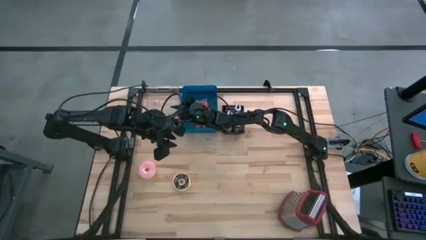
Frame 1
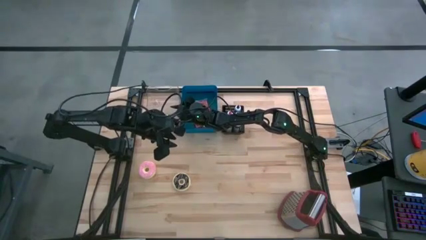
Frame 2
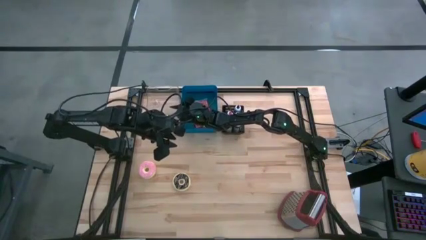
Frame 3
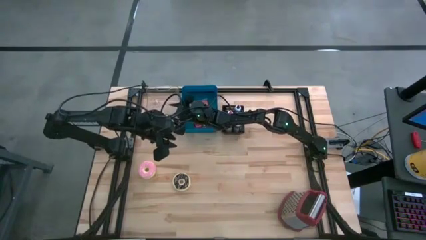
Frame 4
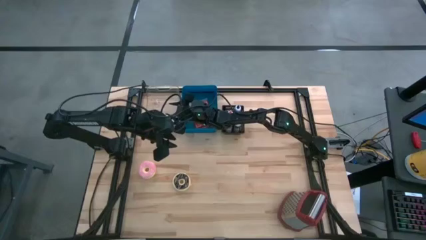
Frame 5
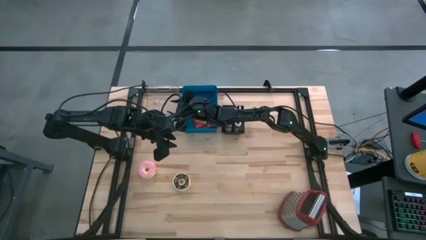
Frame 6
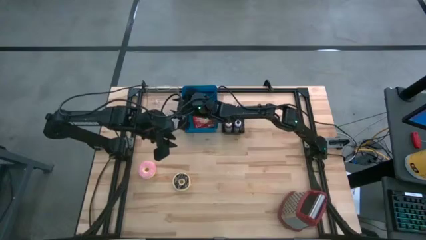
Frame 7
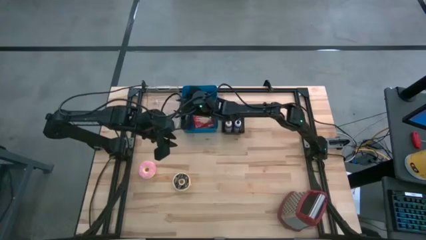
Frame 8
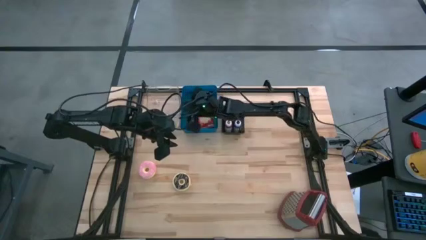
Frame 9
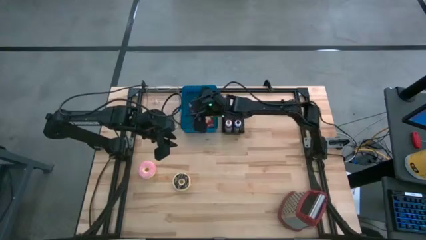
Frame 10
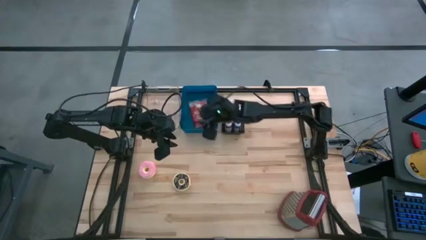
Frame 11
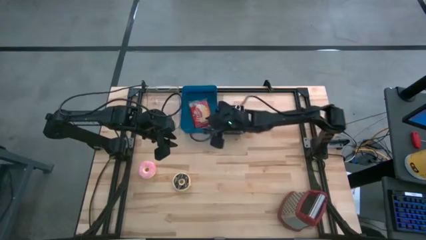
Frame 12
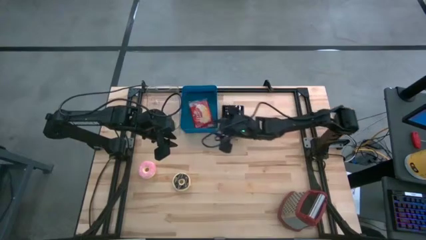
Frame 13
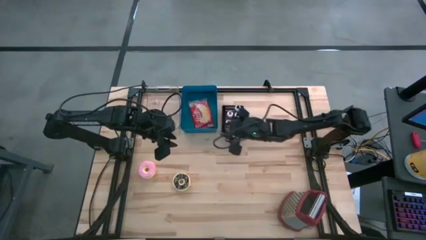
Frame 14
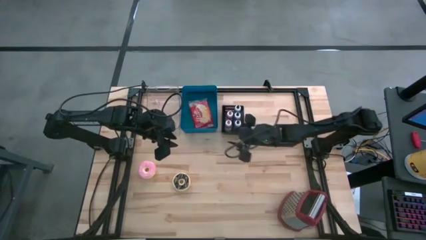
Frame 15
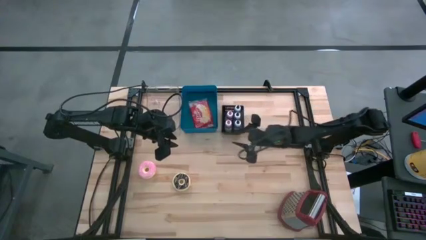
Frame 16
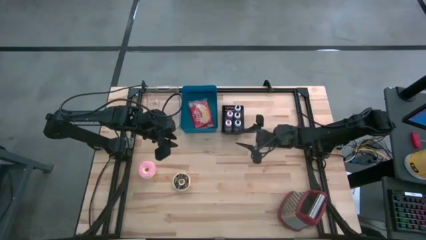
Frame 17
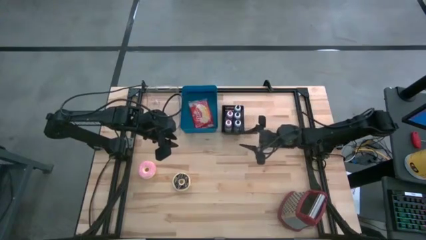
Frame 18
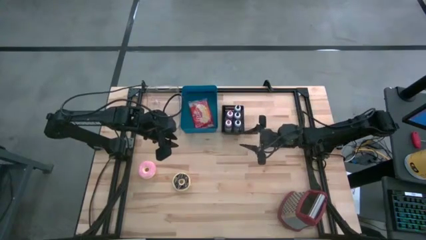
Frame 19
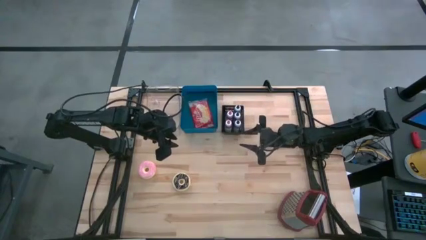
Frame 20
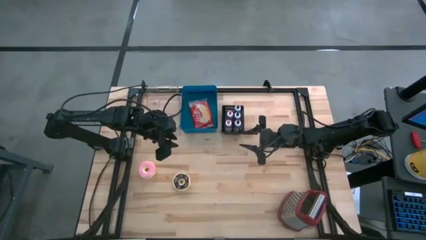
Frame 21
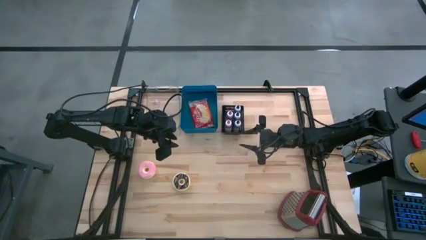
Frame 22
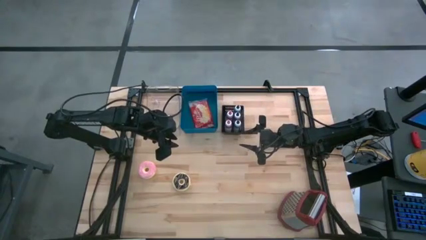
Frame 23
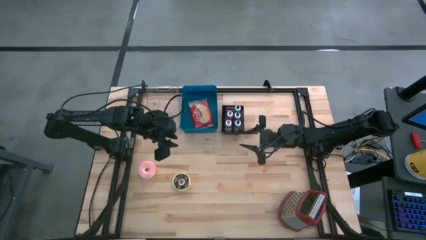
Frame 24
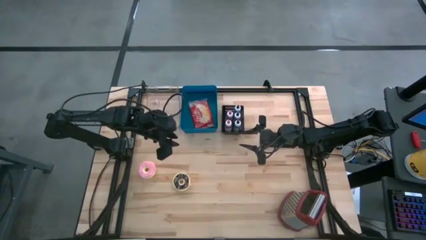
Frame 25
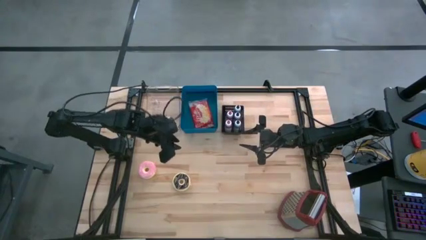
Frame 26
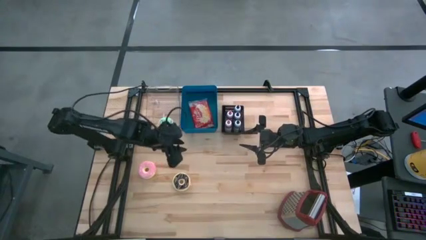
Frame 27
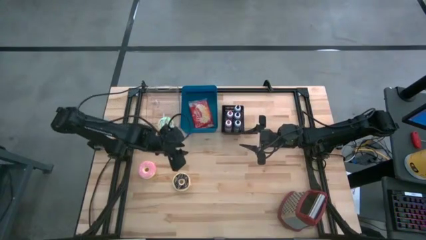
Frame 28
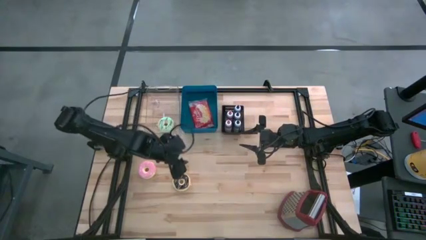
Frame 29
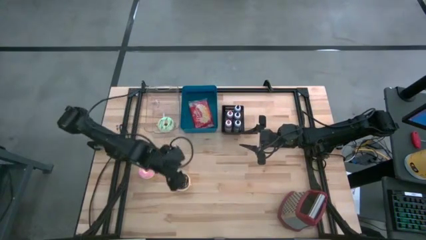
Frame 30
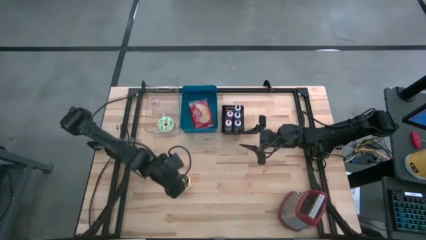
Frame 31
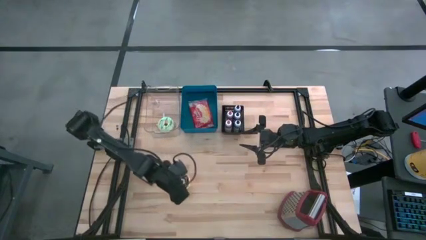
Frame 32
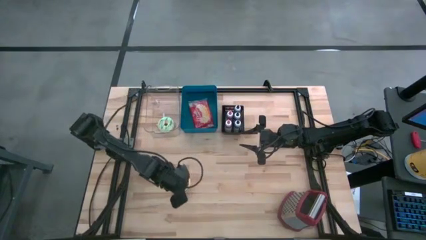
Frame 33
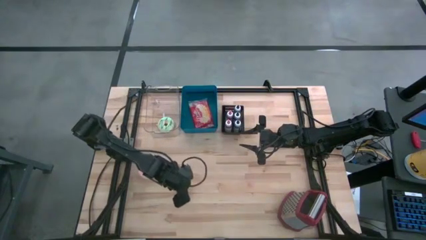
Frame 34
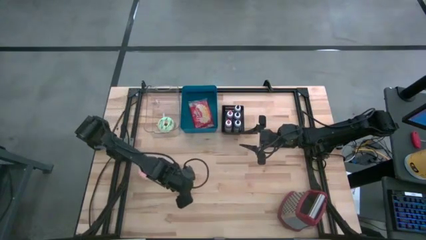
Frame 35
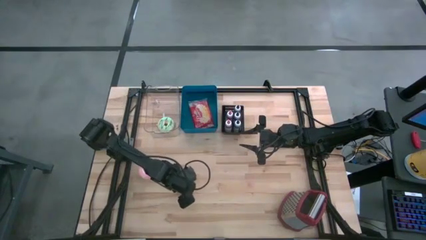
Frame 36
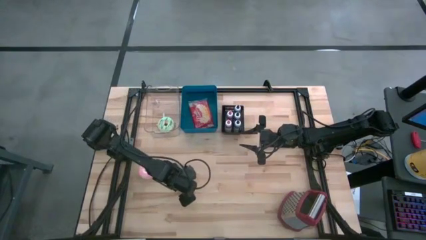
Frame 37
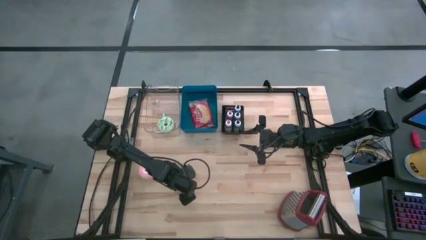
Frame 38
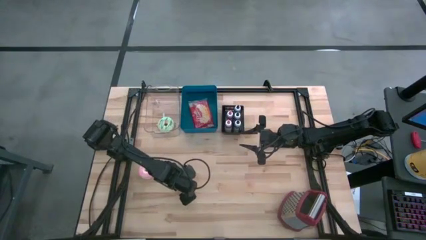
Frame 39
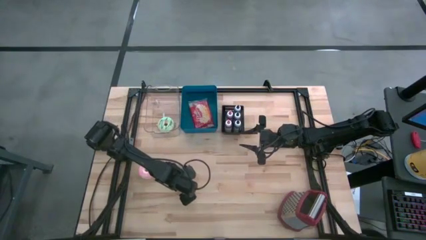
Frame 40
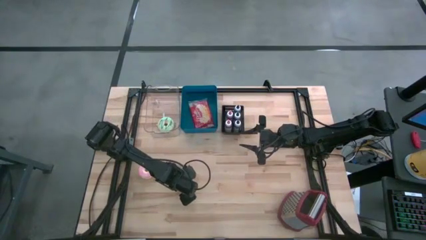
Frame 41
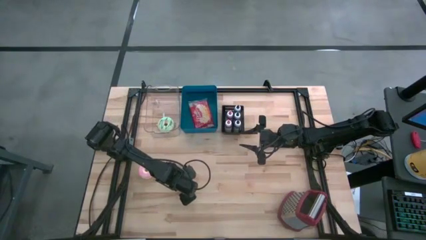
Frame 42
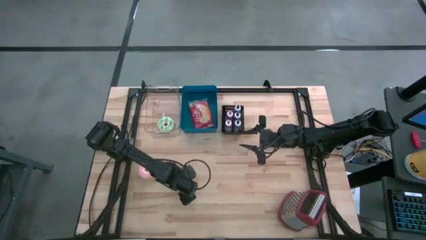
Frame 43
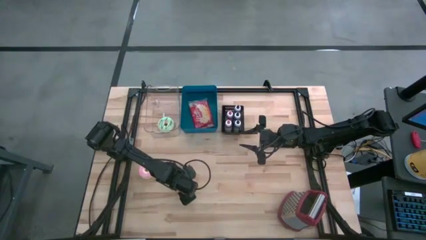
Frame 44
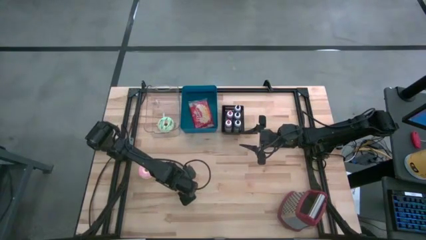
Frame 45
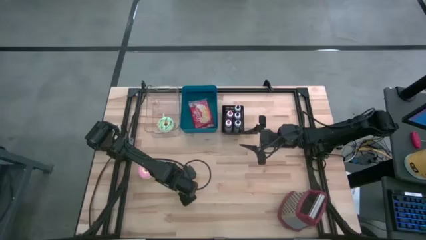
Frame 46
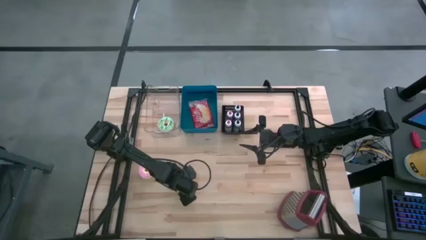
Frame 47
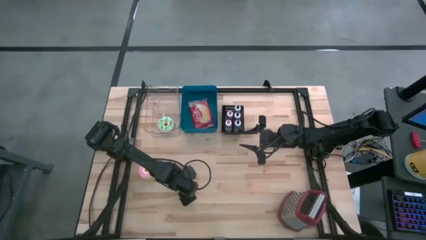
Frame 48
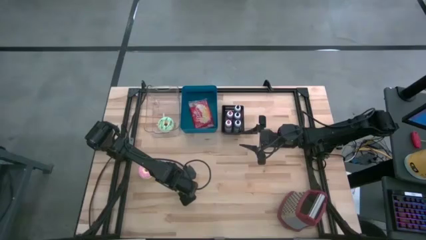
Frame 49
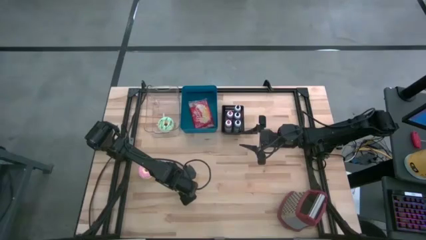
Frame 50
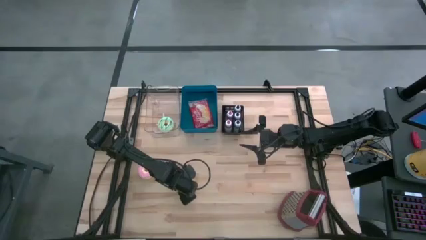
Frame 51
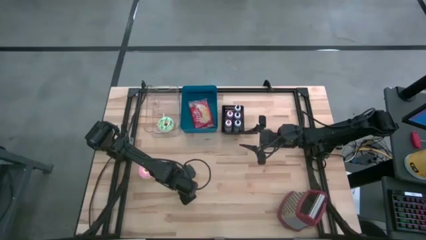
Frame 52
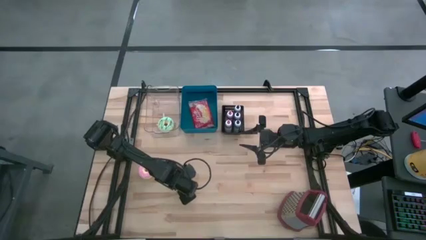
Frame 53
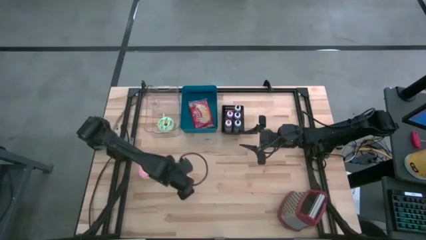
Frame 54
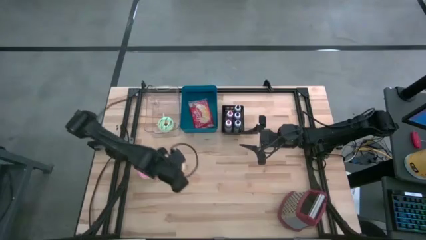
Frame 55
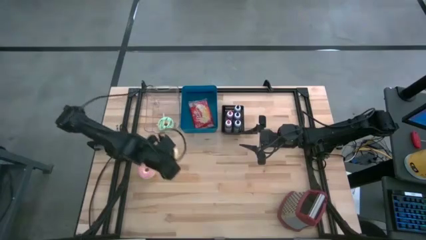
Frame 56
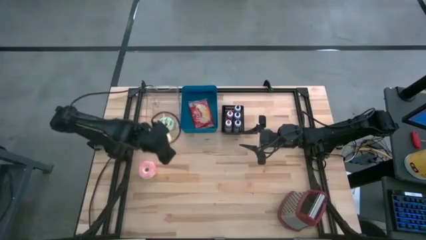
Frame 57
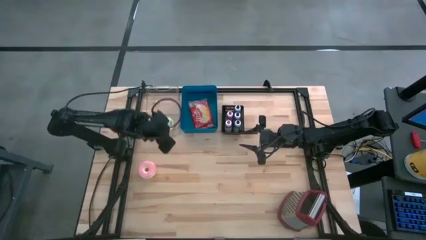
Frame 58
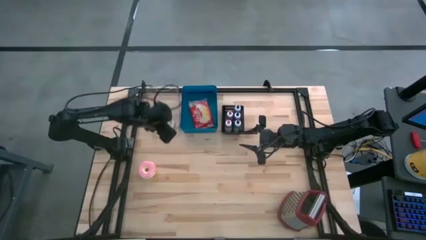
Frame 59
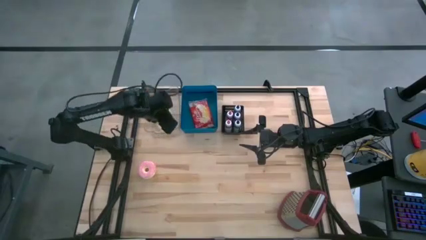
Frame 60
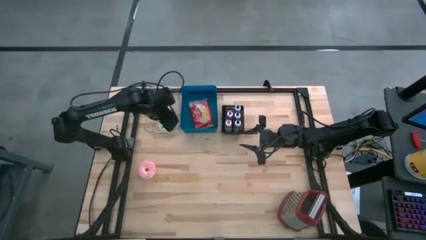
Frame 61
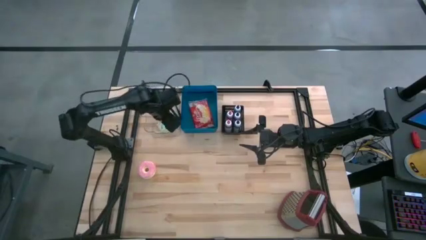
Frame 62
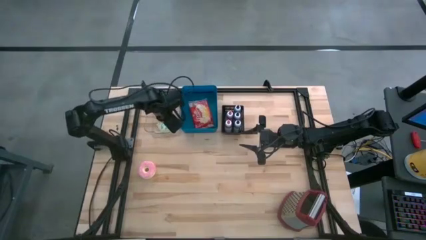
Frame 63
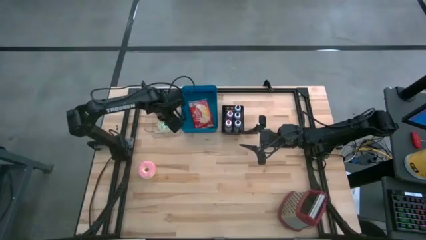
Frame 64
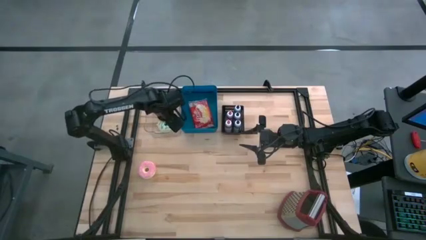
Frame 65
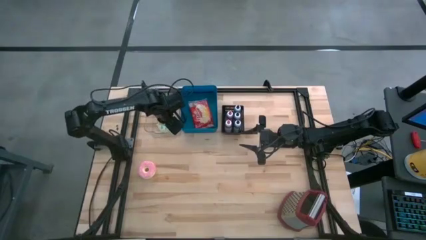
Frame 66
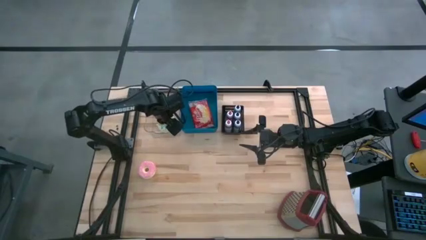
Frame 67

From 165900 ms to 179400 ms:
Put the black donut into the transparent bin
